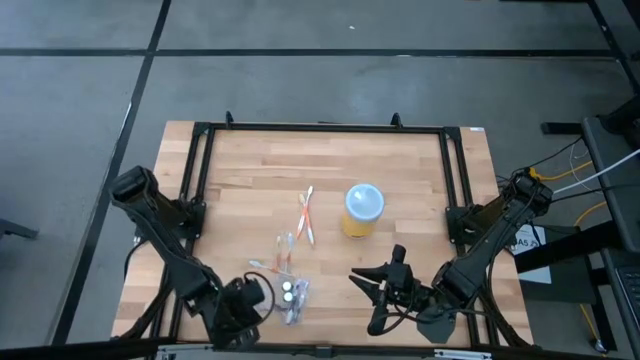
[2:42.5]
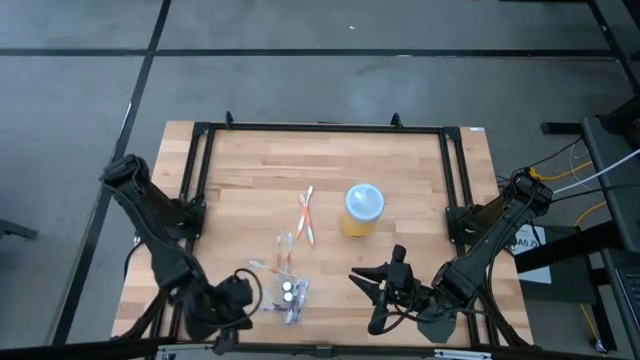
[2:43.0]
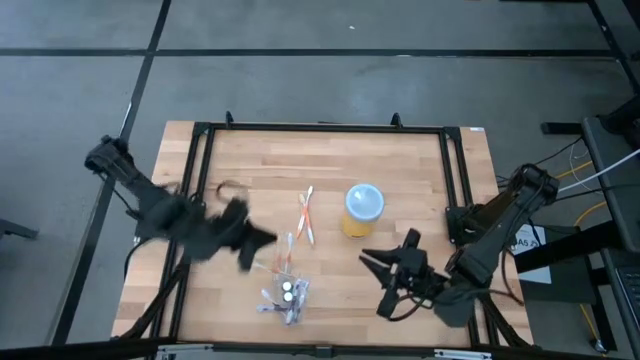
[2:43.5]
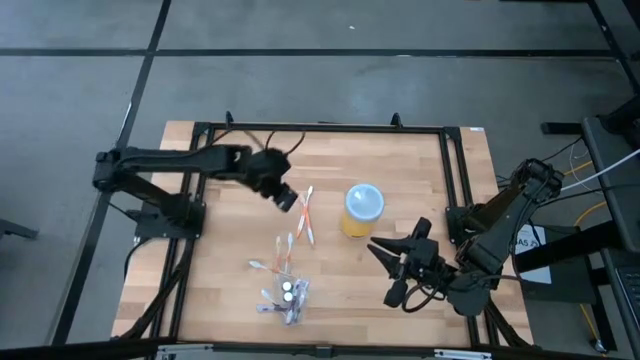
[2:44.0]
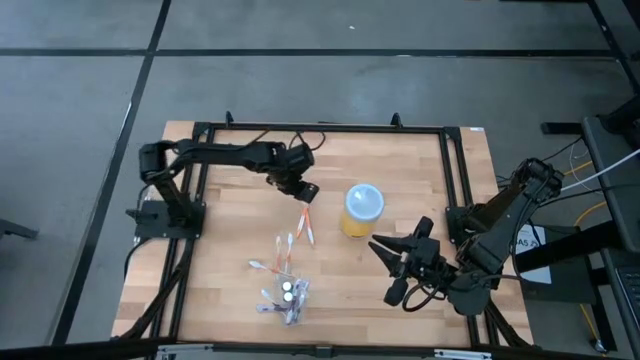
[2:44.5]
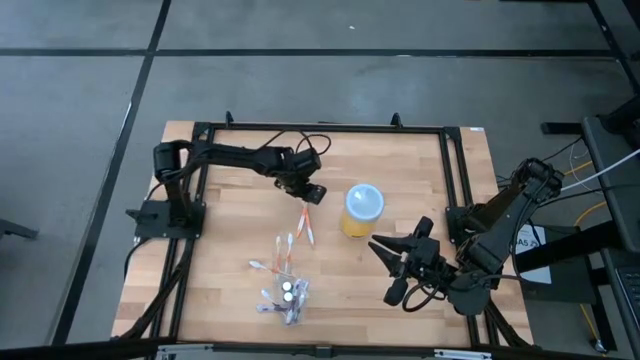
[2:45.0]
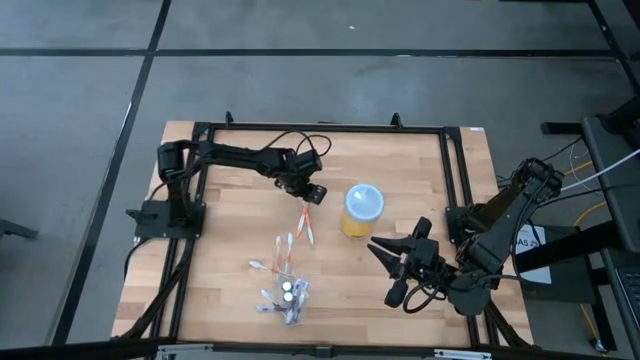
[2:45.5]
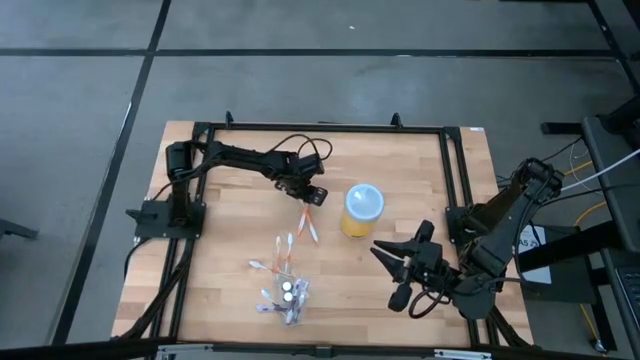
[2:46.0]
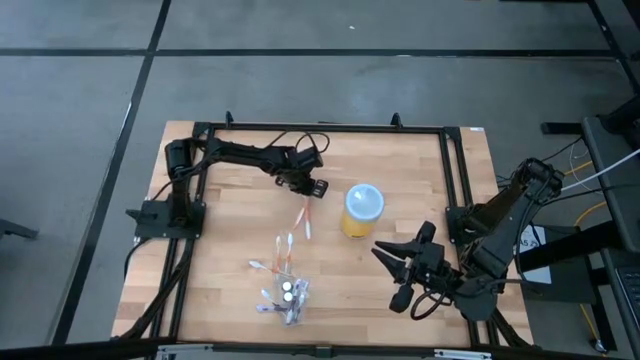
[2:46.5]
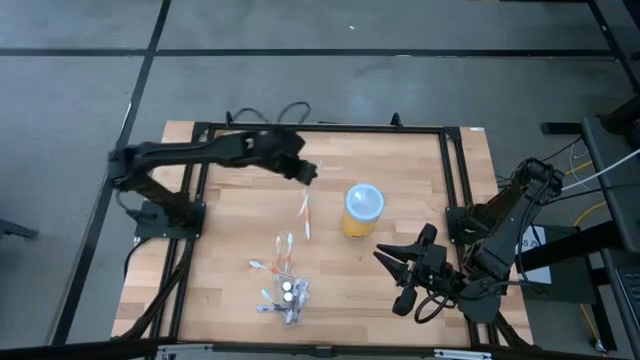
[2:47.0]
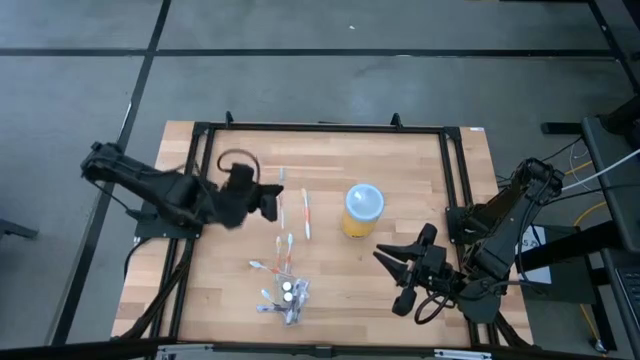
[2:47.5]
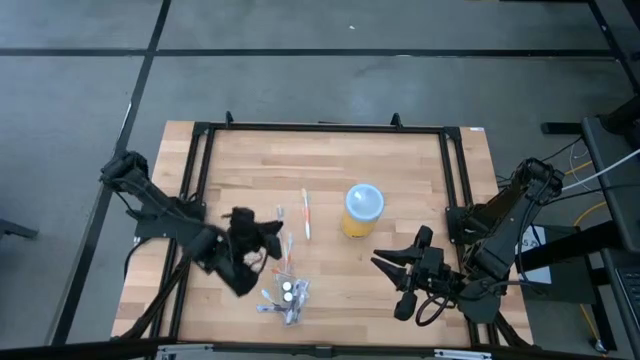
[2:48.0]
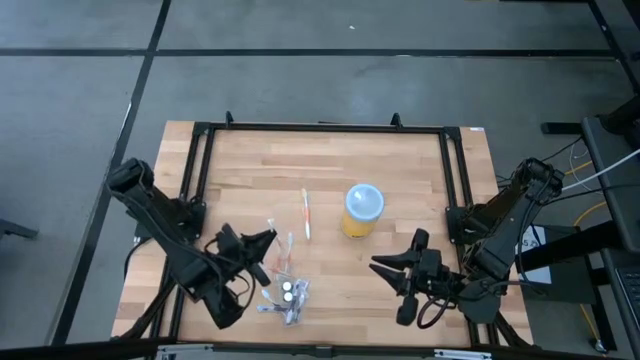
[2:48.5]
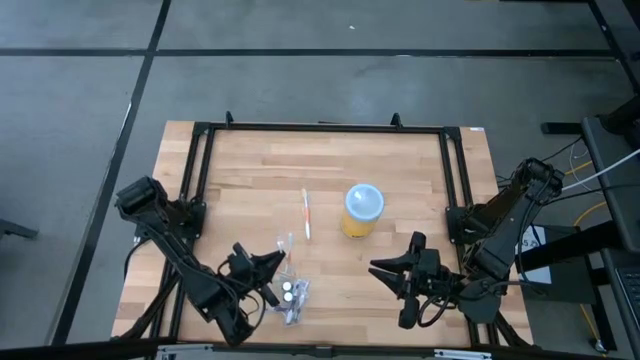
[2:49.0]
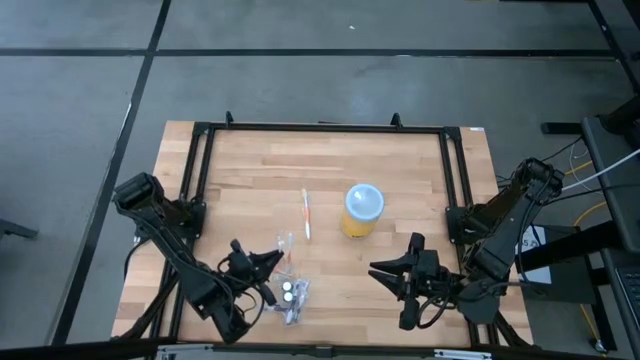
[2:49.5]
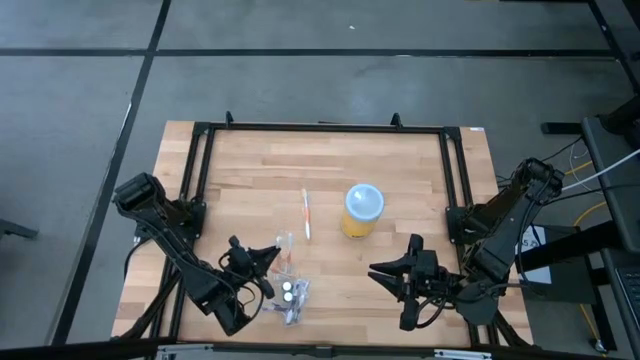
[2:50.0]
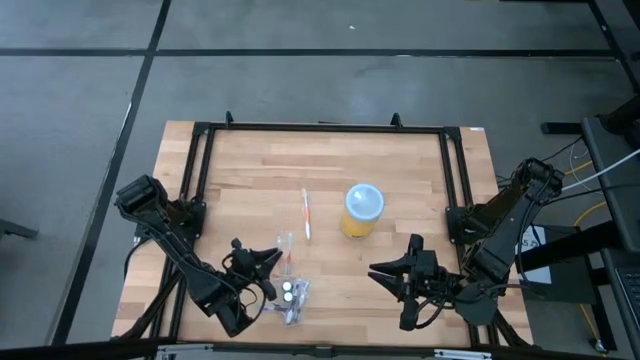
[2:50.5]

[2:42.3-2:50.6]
Task: Pick & Place toothbrushing station
Put the top orange toothbrush into the left side of the transparent organizer

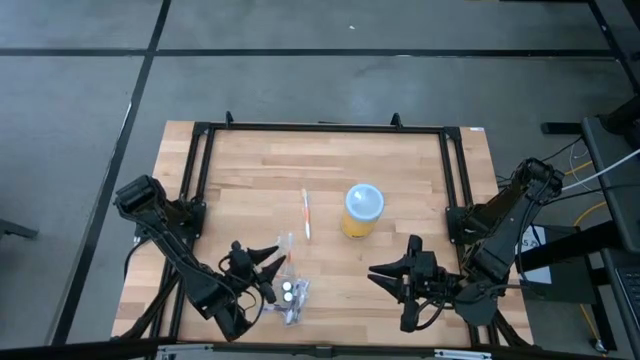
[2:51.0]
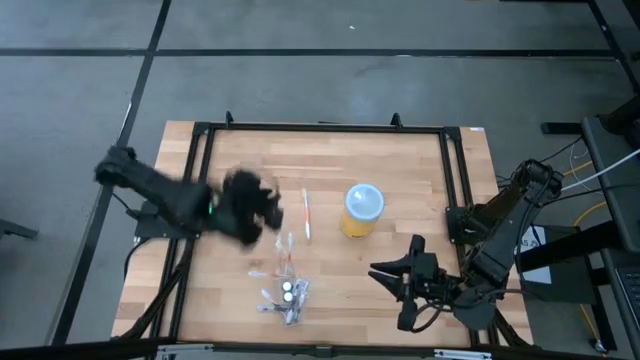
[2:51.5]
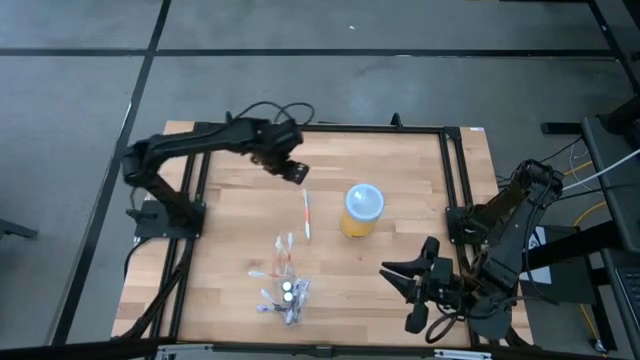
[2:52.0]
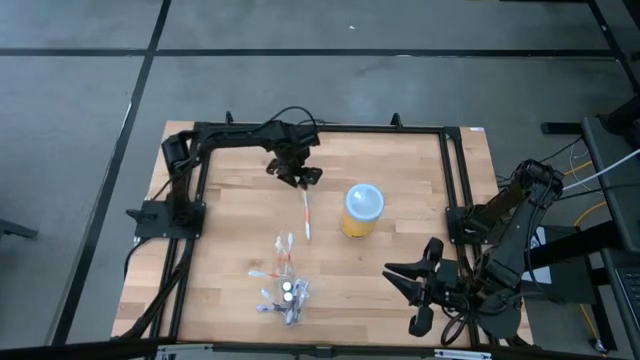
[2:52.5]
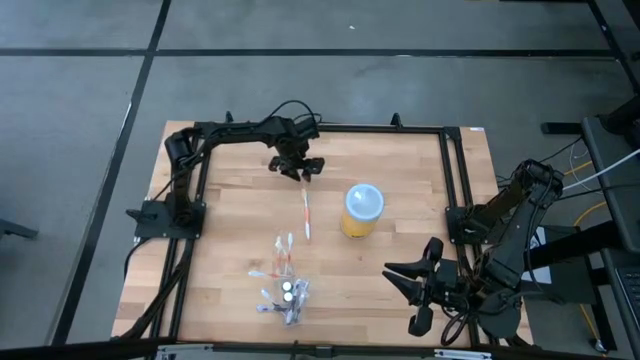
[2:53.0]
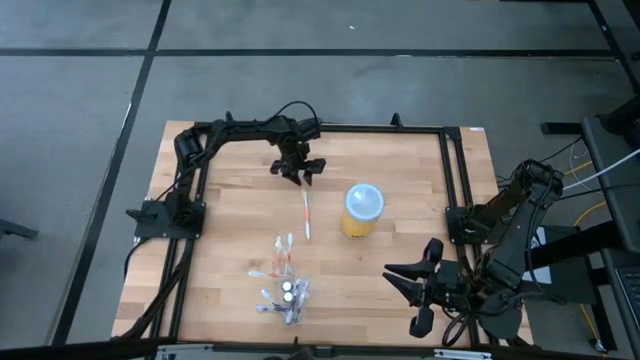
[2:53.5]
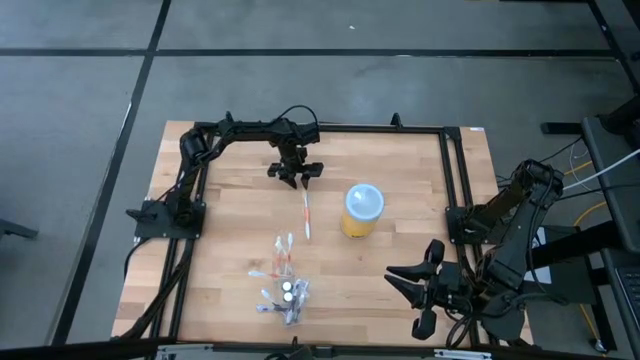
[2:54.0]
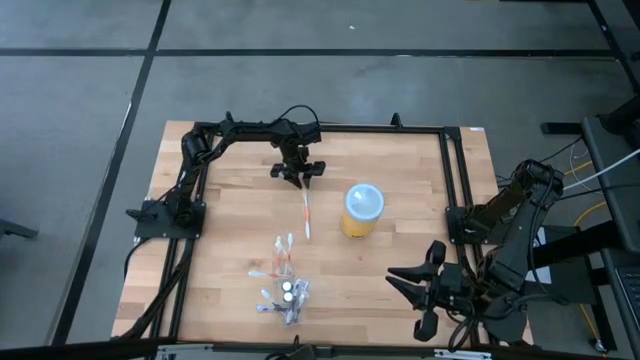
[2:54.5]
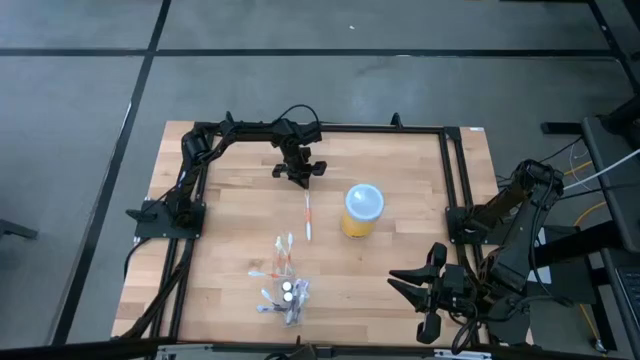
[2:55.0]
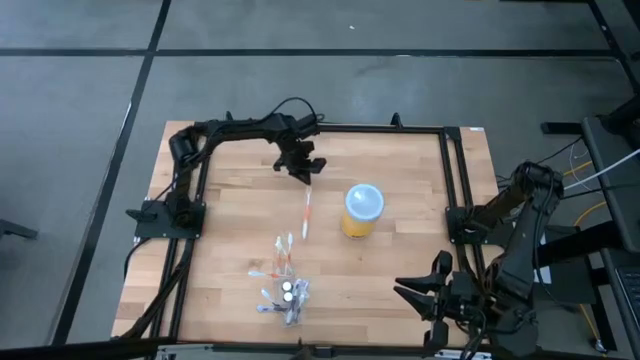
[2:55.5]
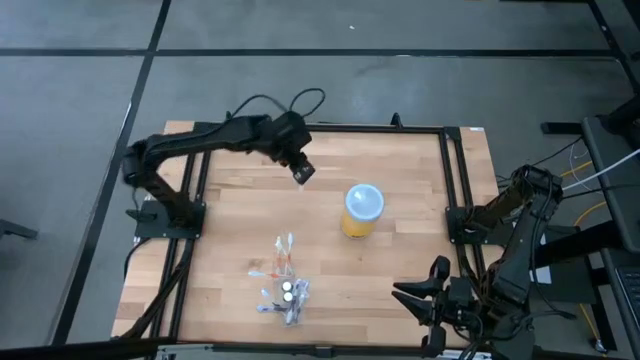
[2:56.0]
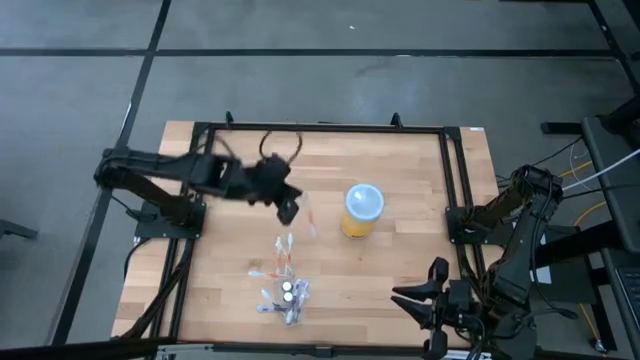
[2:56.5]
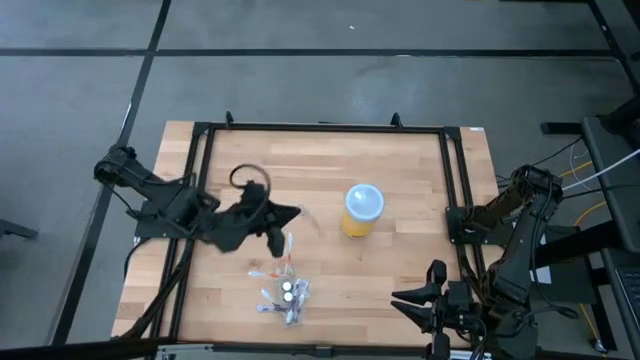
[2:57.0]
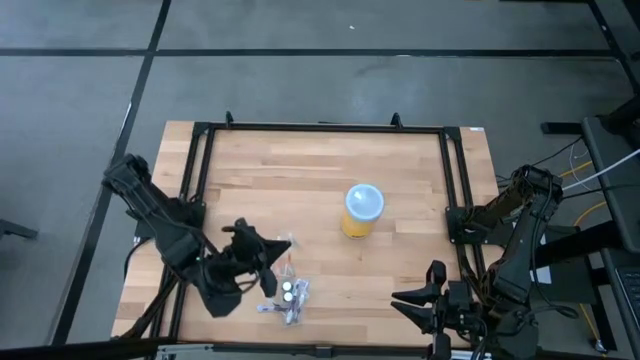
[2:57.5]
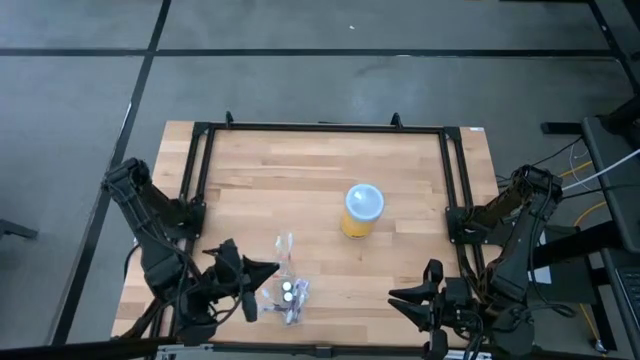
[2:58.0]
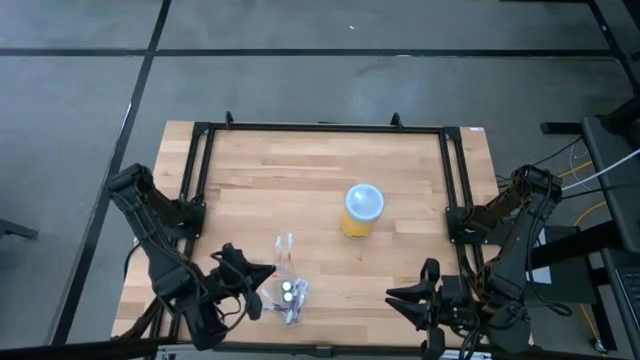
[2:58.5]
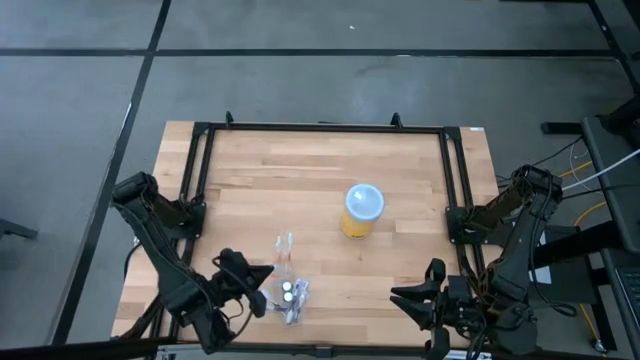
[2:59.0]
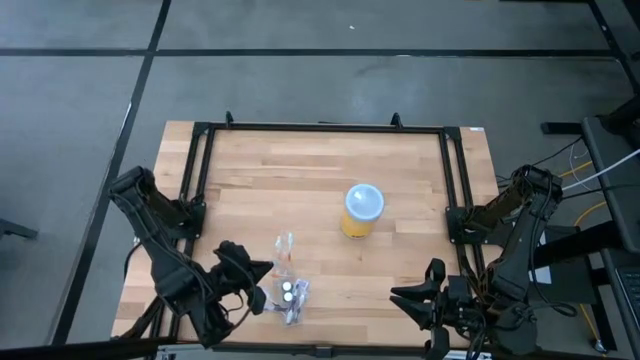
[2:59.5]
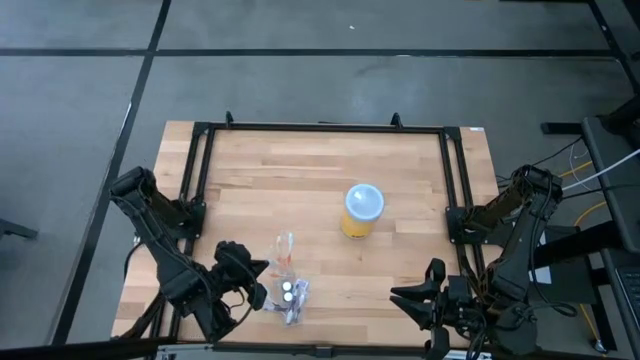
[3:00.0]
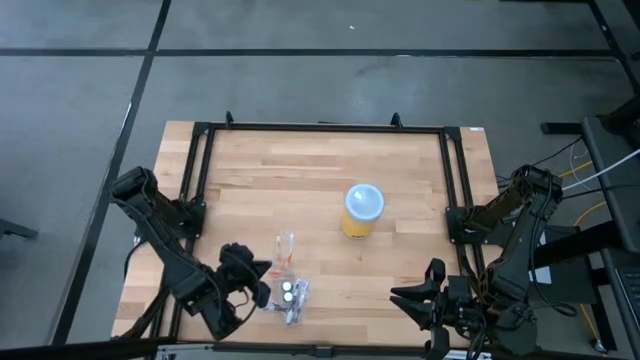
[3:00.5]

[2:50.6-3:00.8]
Put the orange toothbrush into the left side of the transparent organizer

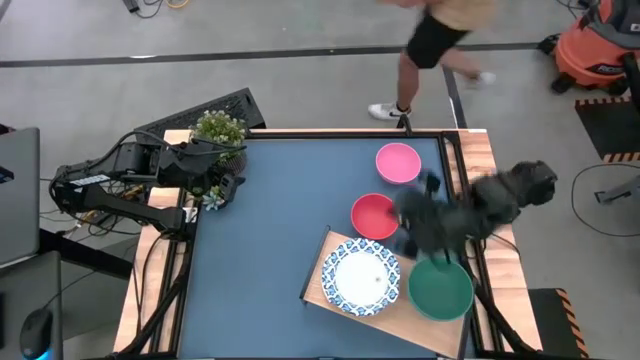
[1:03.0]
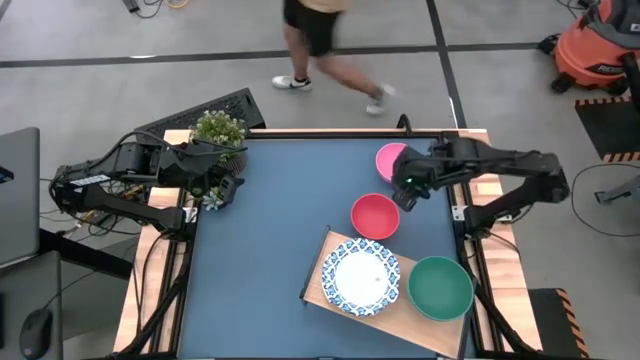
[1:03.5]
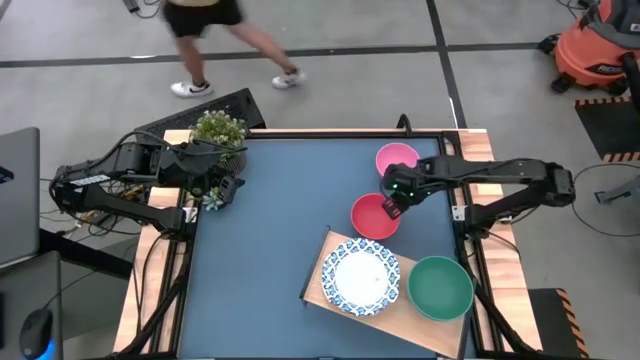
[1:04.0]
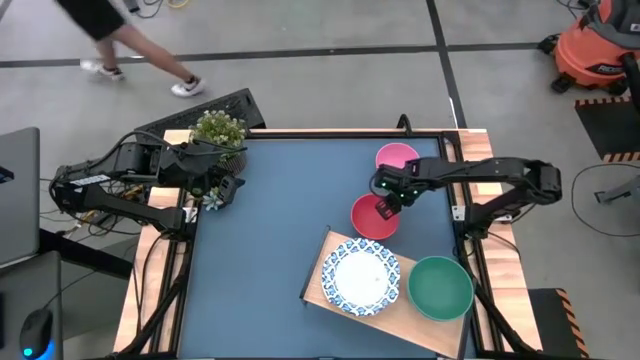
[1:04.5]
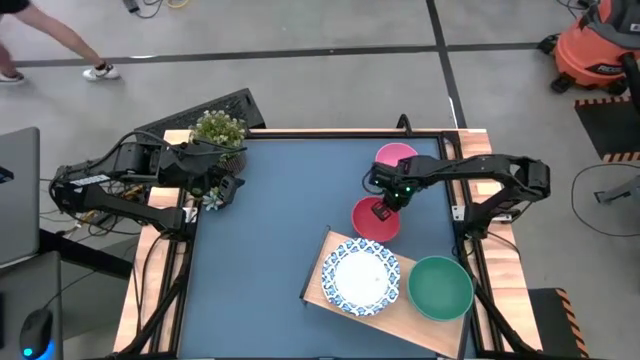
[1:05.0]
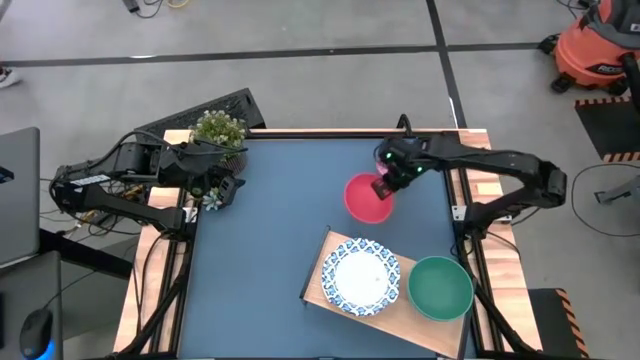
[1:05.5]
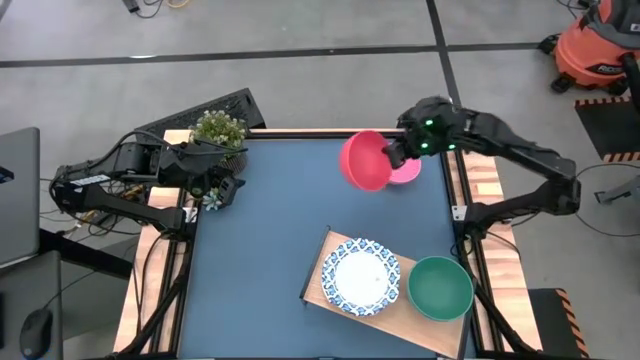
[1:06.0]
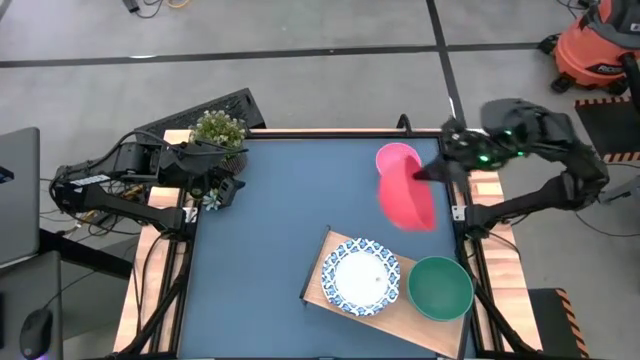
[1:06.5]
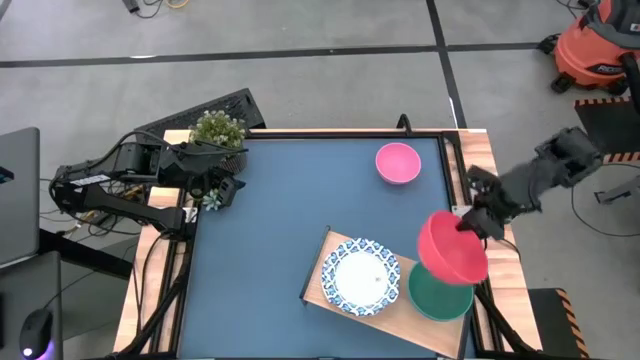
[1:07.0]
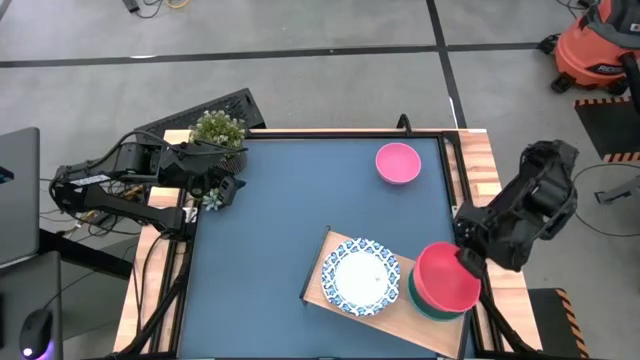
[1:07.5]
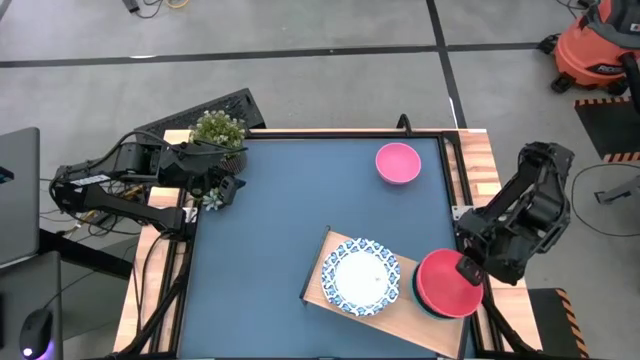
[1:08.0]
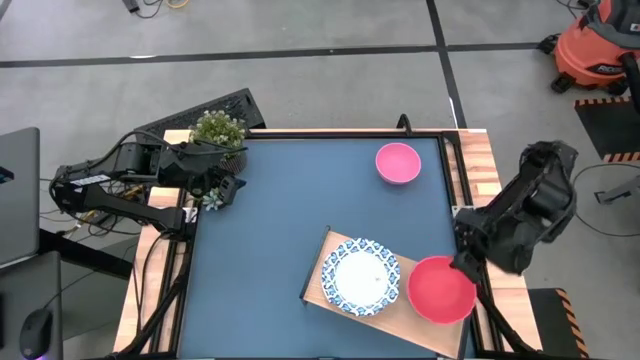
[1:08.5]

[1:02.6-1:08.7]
Task: Place and stack bowls onto a shelf
Stack the orange bowl on top of the green bowl on the shelf
